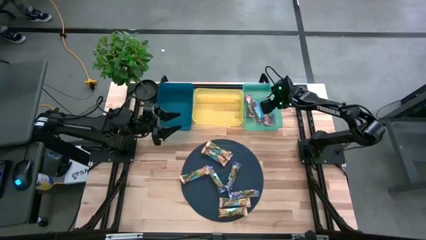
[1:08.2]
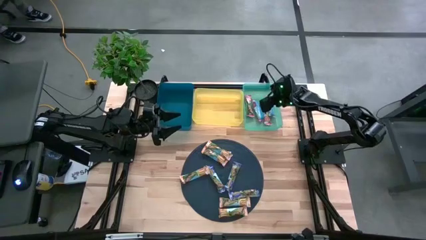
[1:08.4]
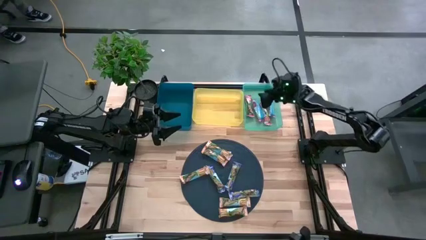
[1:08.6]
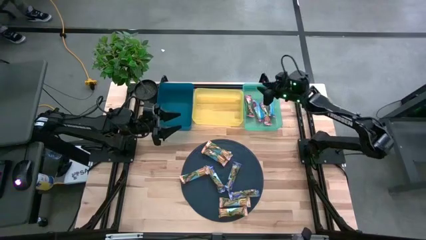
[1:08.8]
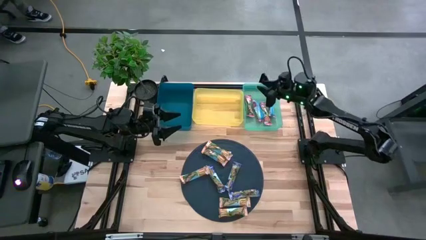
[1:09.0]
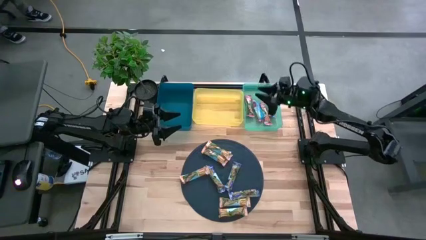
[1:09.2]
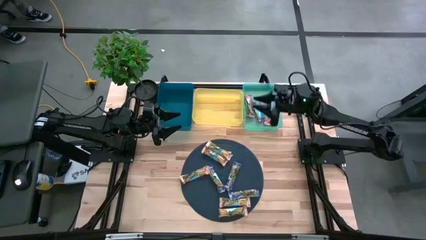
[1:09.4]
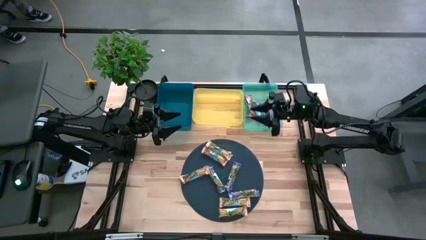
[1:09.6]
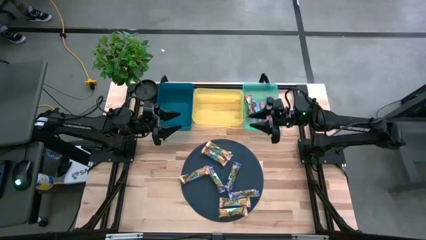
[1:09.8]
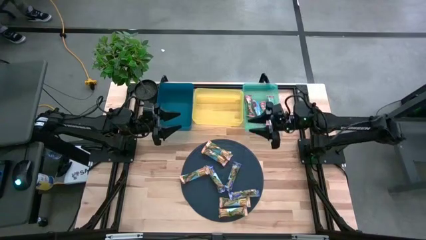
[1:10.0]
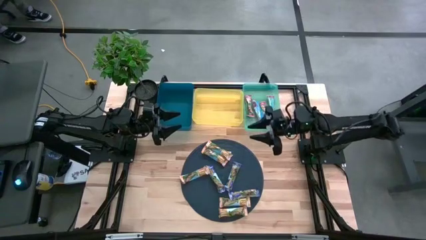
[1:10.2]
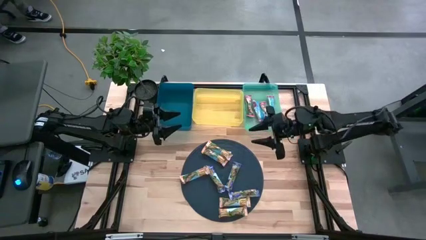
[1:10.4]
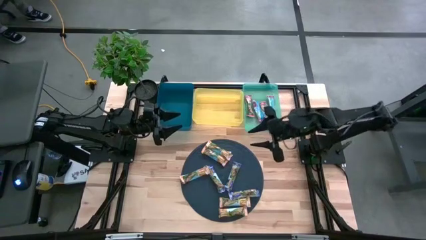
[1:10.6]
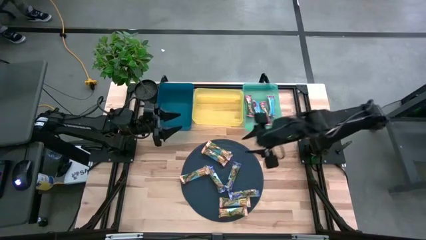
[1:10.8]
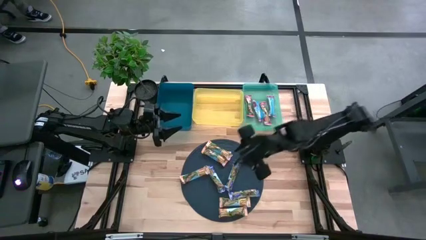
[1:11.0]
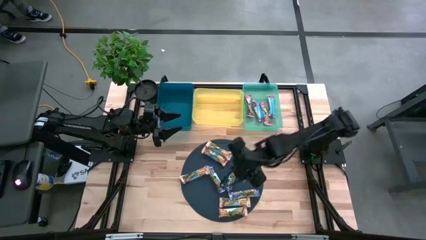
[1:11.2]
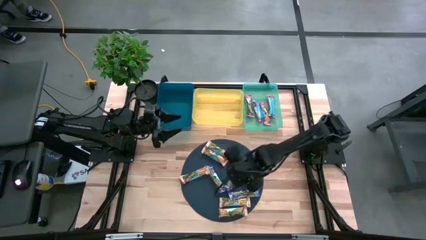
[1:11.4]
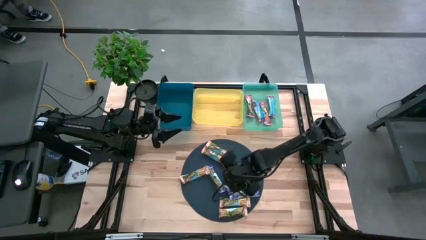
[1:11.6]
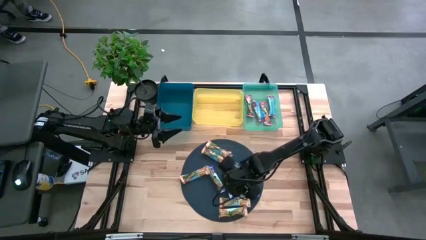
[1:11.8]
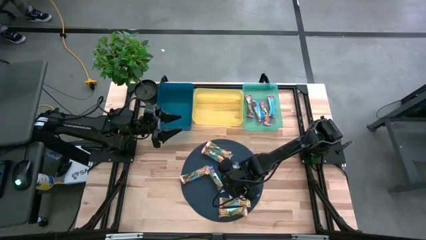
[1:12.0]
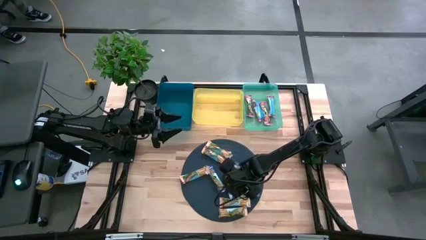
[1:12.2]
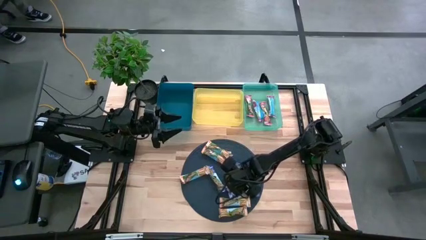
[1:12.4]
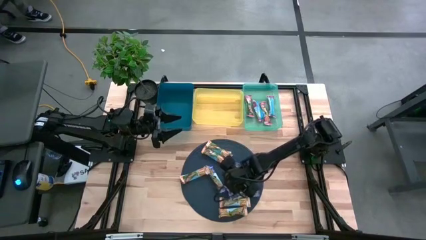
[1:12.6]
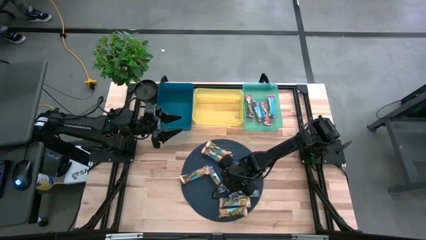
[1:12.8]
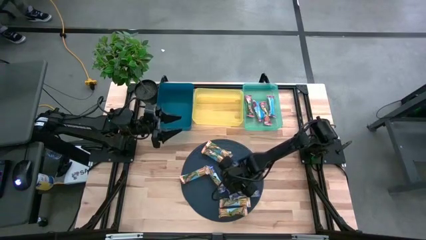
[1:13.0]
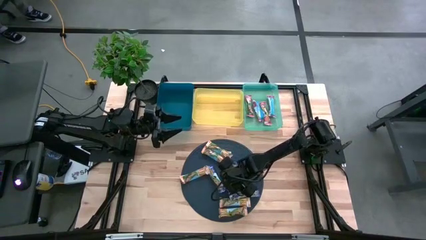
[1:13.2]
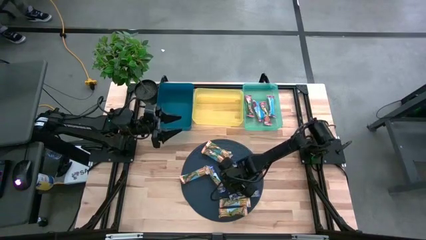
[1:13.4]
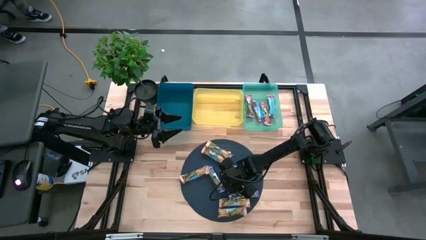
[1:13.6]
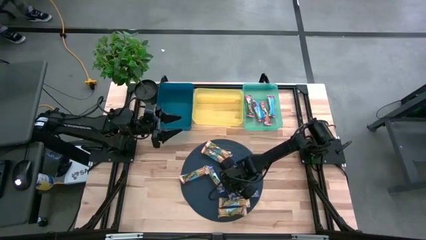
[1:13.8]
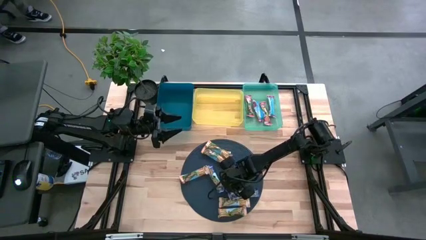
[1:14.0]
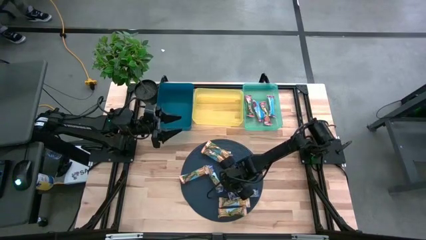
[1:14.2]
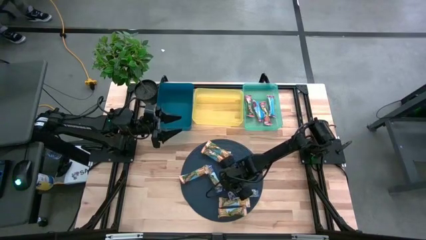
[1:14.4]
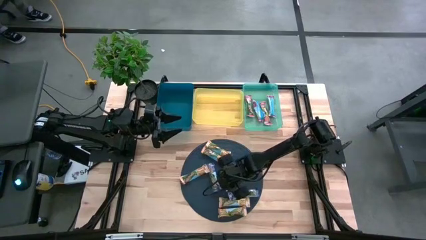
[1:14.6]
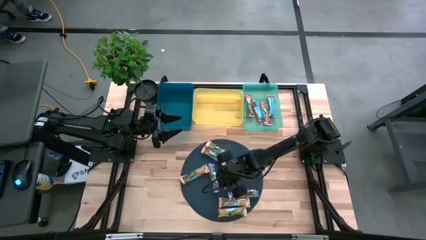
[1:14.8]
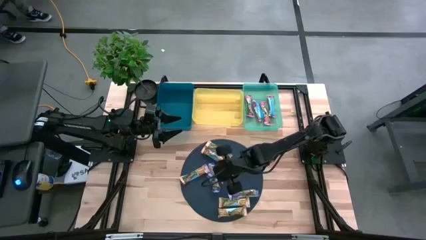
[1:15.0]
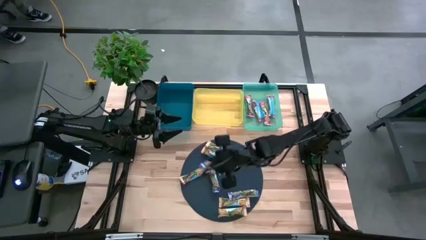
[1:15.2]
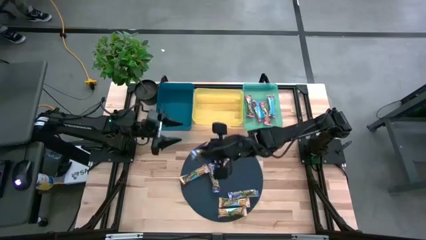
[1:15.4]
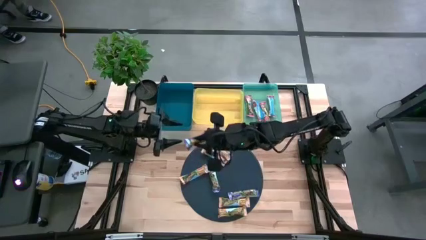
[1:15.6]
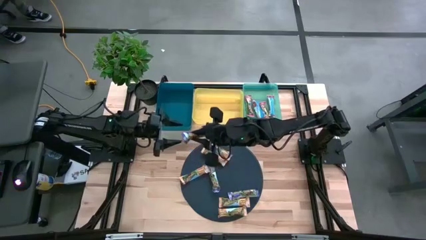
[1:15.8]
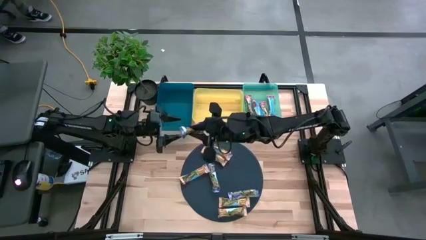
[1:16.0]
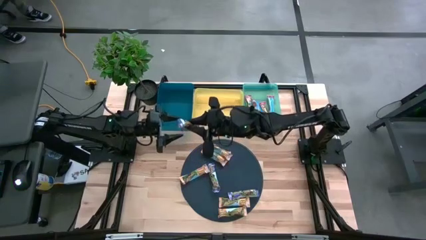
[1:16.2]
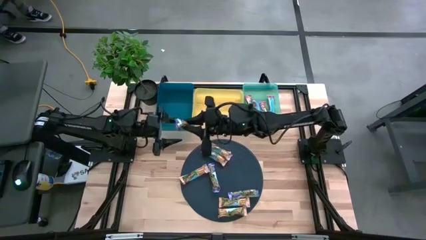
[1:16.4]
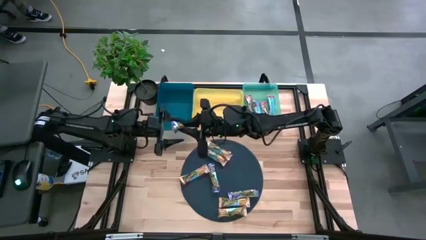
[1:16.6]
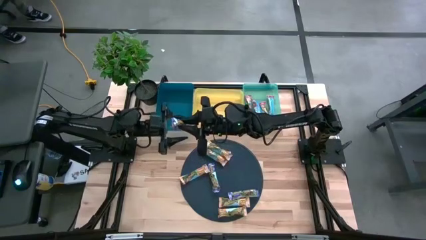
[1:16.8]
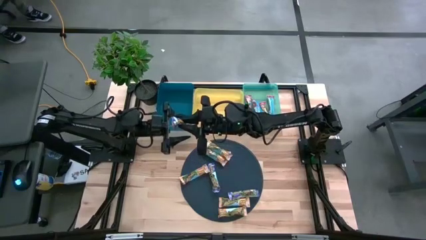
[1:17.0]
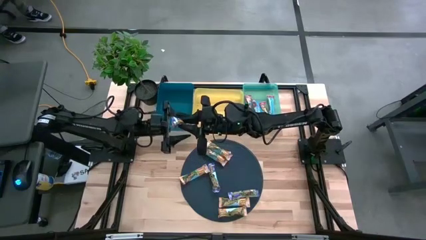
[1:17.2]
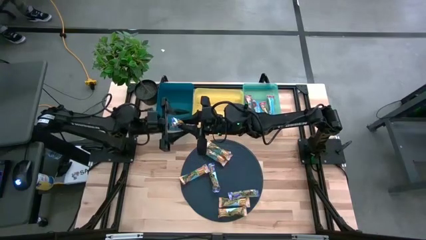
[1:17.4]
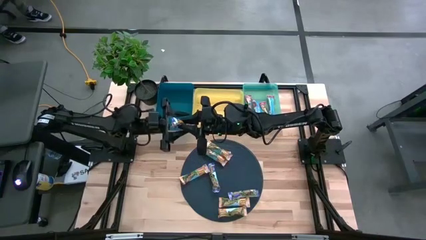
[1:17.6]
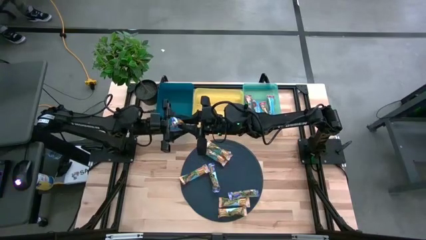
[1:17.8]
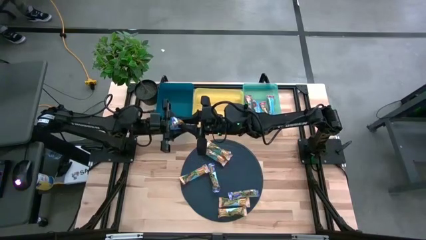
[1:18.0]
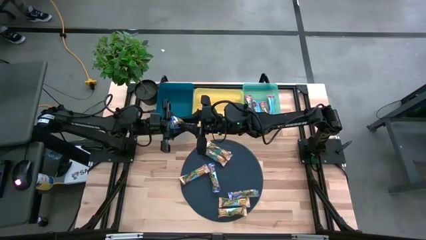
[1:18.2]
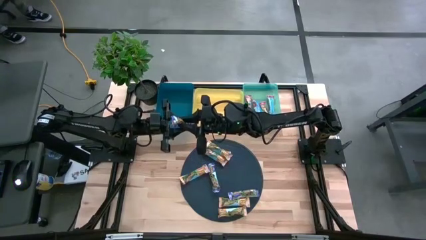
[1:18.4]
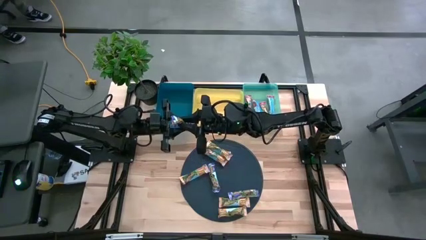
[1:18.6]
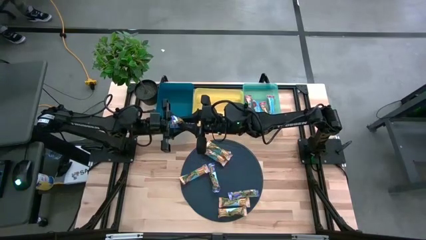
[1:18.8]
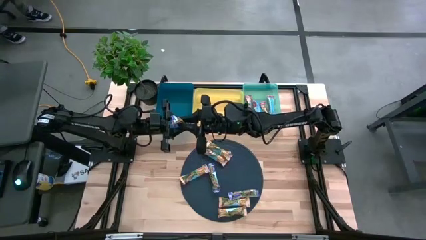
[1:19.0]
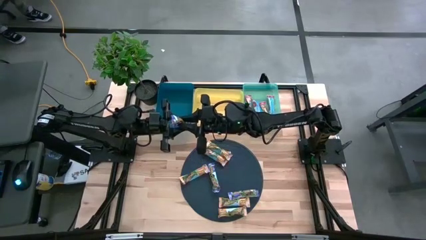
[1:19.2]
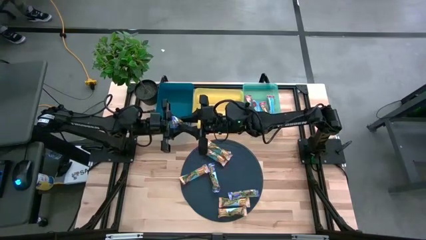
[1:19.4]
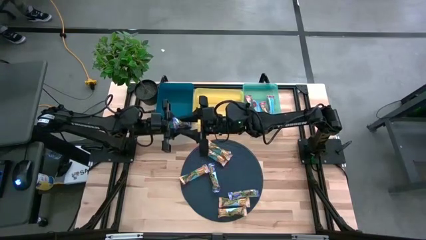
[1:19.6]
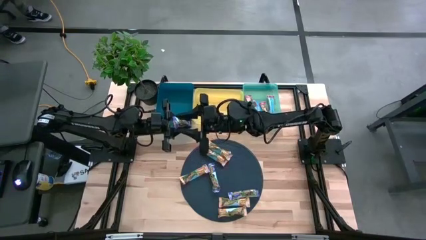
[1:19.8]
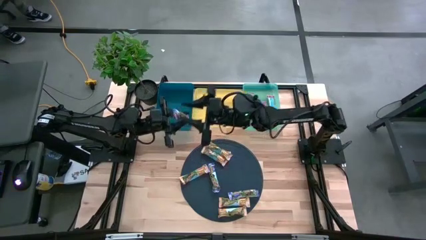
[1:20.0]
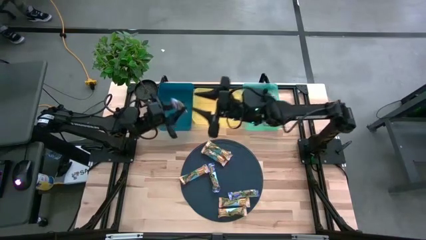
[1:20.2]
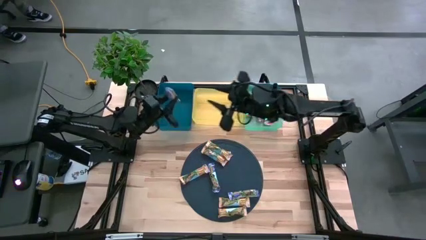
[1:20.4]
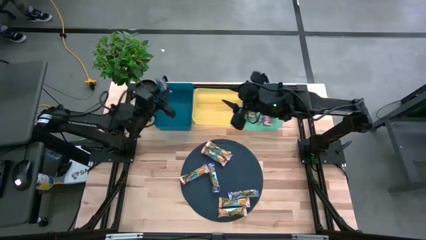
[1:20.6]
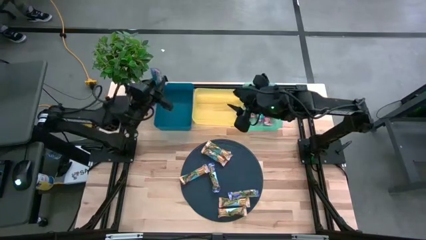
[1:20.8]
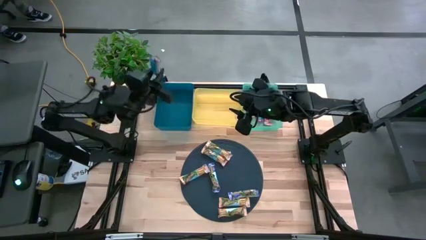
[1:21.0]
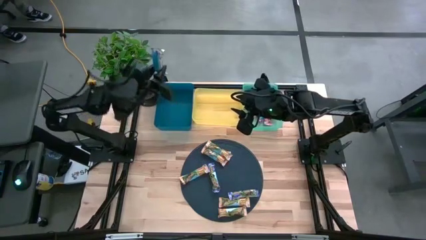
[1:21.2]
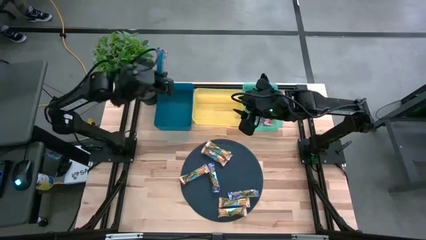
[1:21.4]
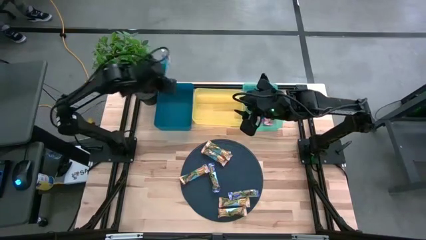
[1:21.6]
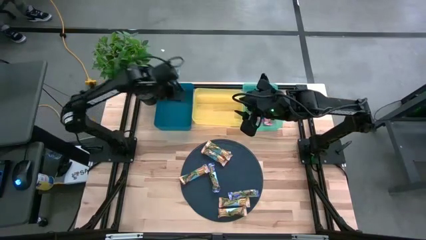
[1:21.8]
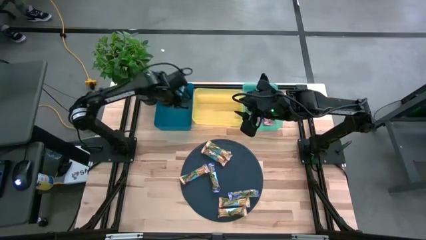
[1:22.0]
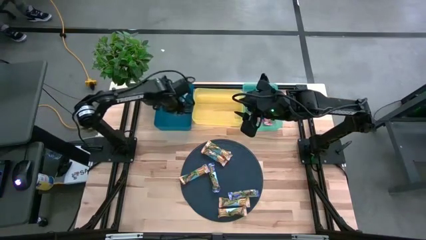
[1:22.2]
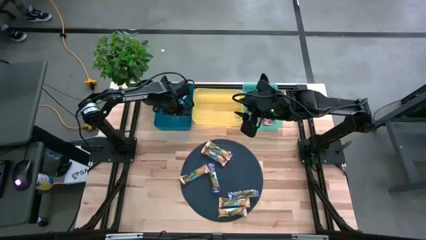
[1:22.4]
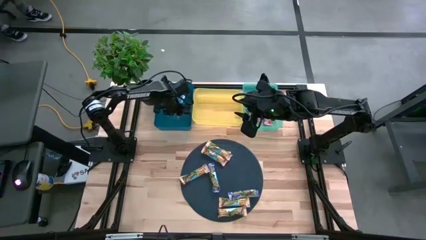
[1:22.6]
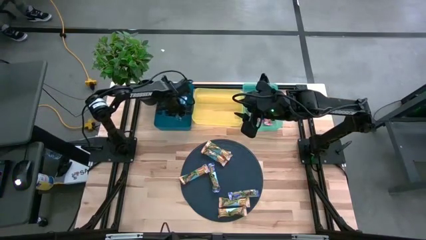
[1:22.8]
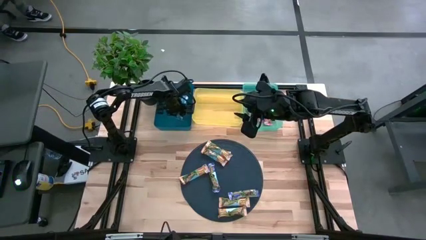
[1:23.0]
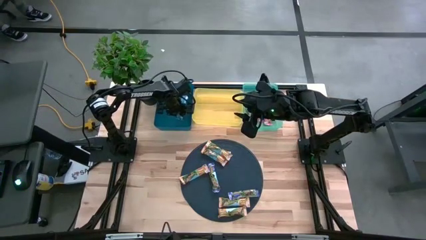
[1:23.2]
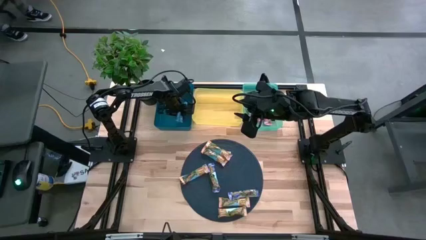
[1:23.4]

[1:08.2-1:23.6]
Task: Pick and place Granola Bars by type
Put the blue granola bar into the blue bin
